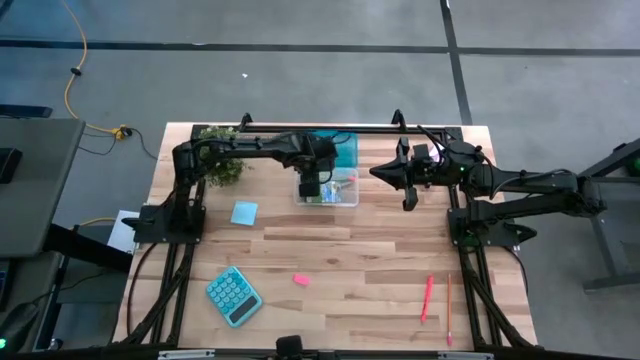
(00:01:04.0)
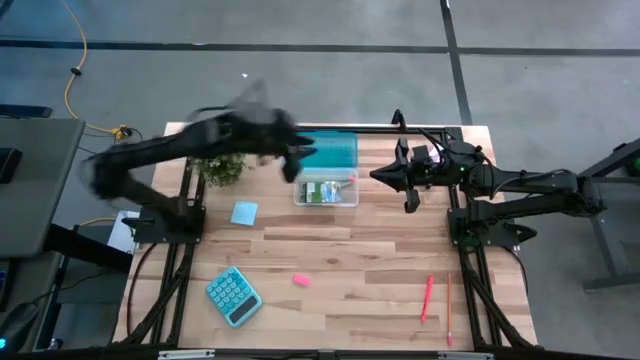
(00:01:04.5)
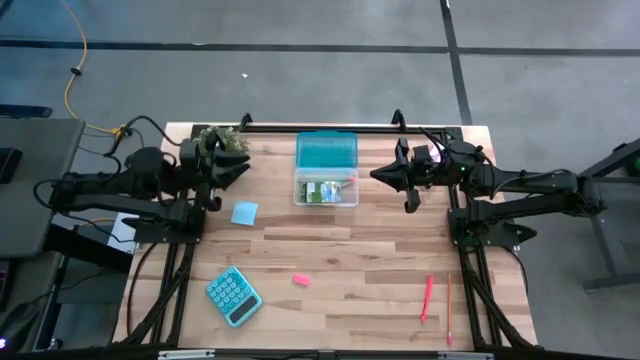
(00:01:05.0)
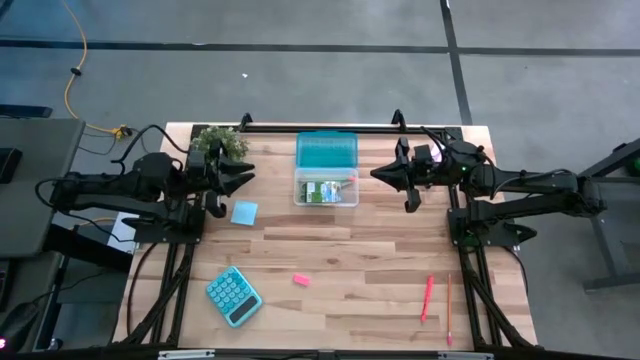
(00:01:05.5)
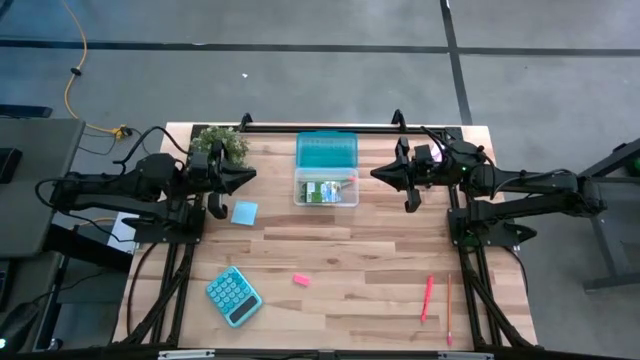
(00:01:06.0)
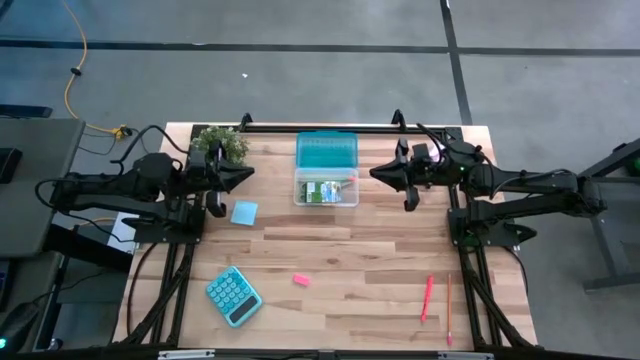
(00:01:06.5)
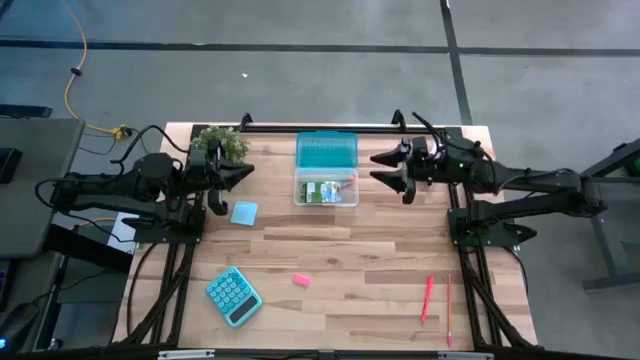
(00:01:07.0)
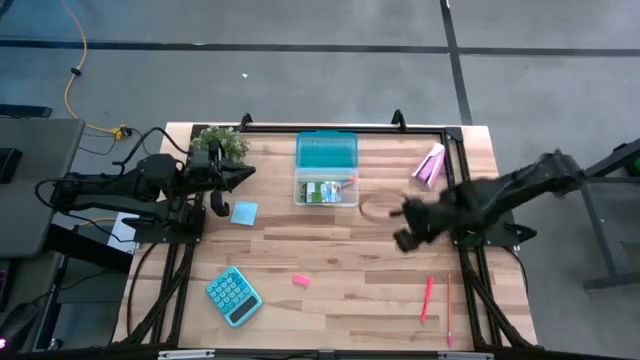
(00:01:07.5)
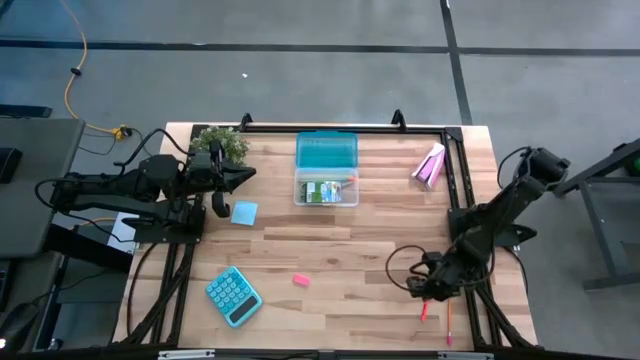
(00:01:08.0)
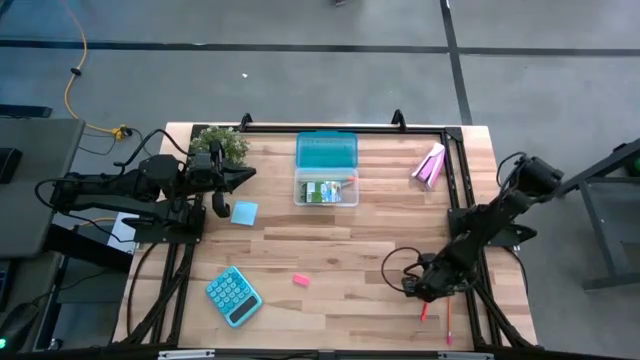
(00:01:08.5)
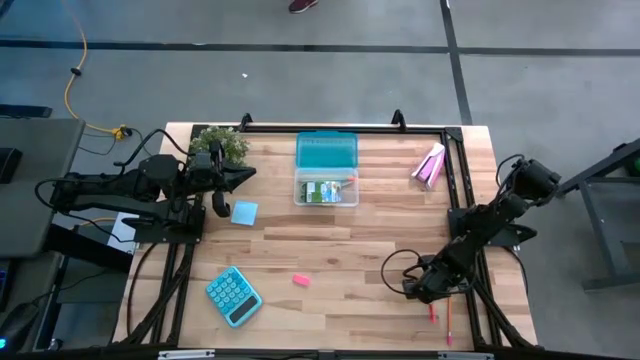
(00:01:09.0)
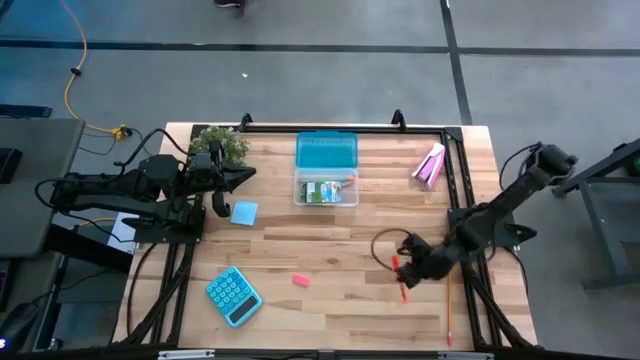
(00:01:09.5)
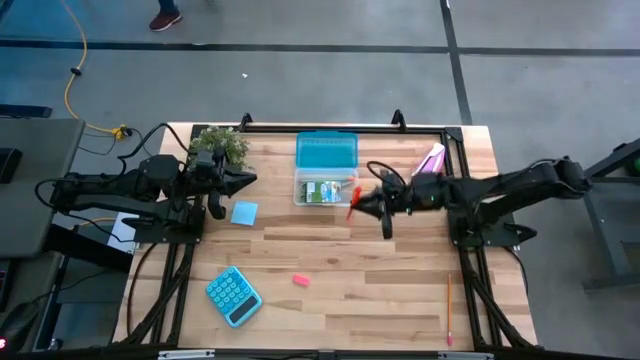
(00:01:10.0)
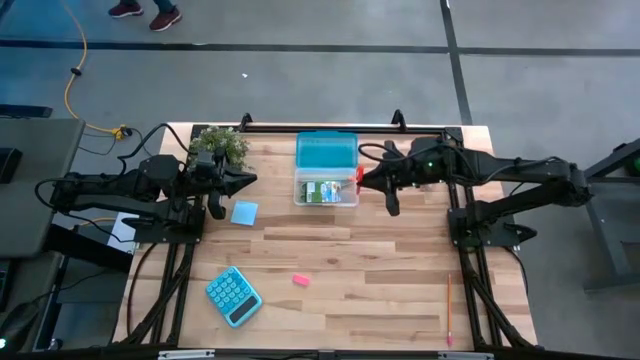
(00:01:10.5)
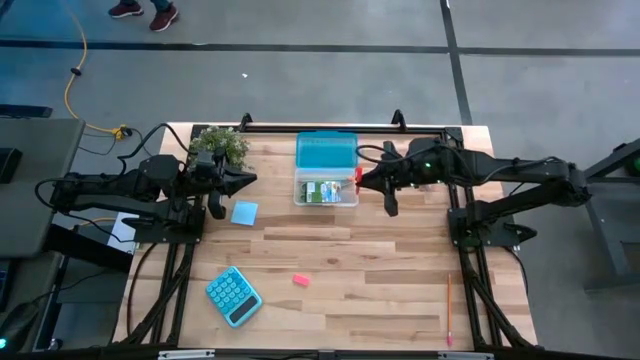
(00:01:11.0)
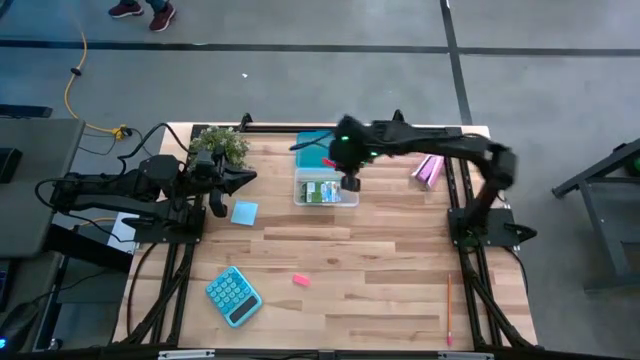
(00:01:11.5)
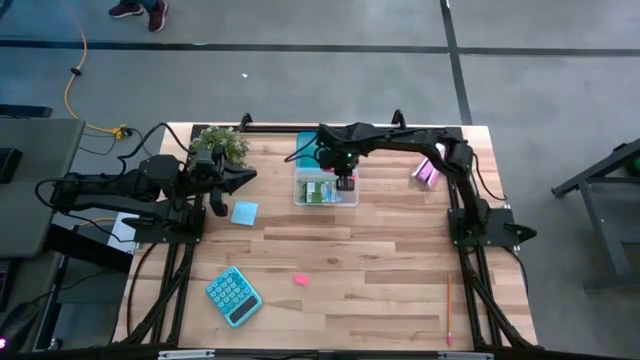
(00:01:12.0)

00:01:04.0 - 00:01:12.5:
Task: Pack school essentials
Put the orange pen into the supply box

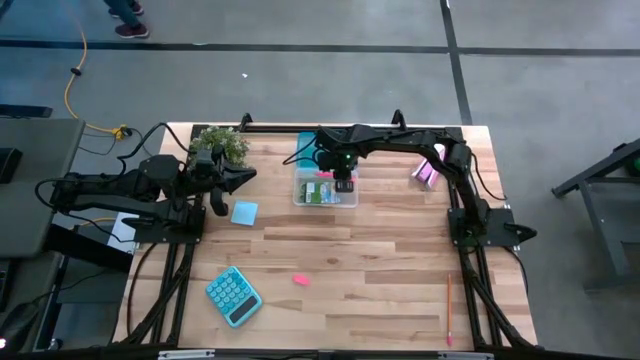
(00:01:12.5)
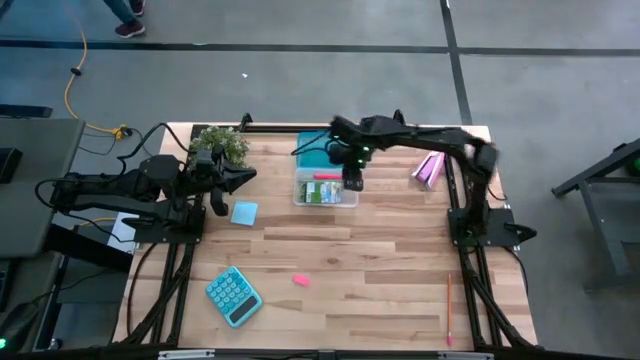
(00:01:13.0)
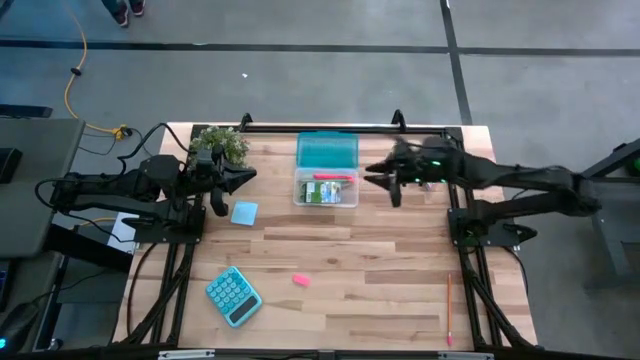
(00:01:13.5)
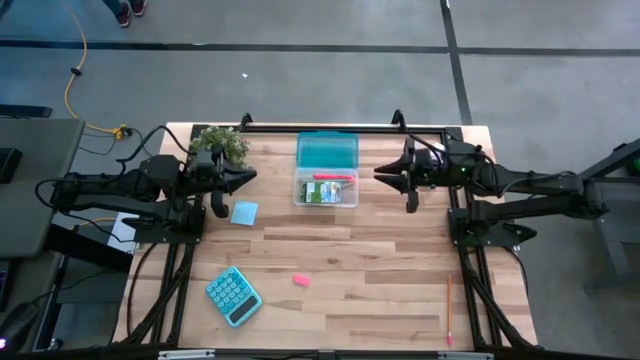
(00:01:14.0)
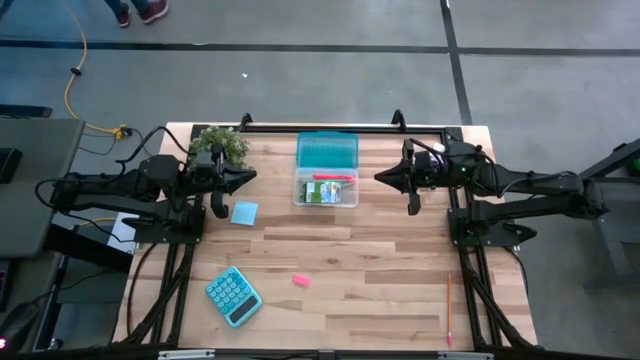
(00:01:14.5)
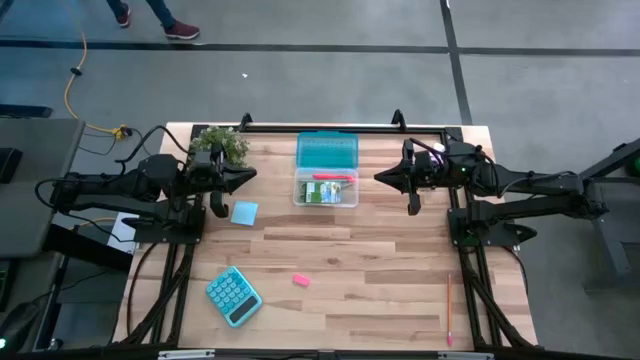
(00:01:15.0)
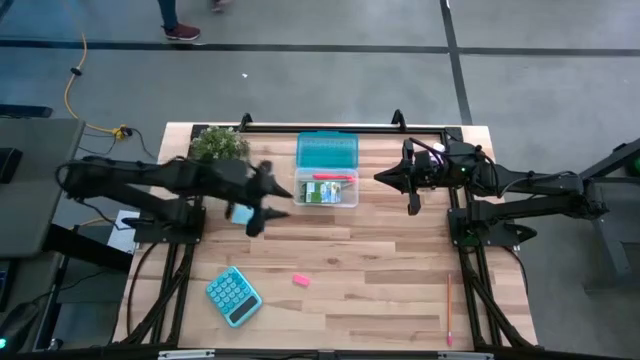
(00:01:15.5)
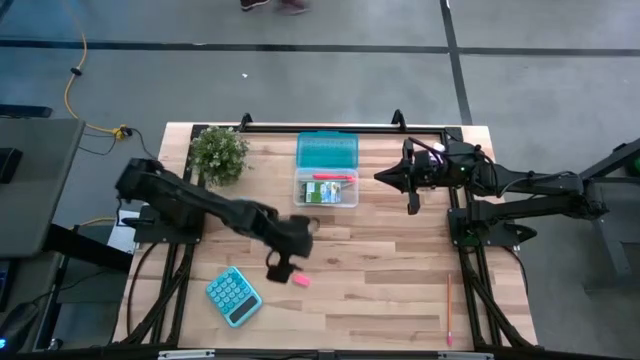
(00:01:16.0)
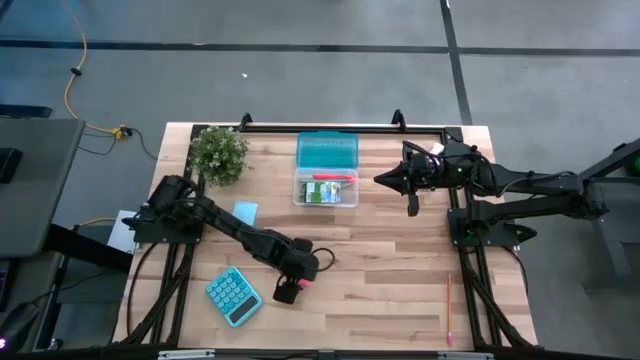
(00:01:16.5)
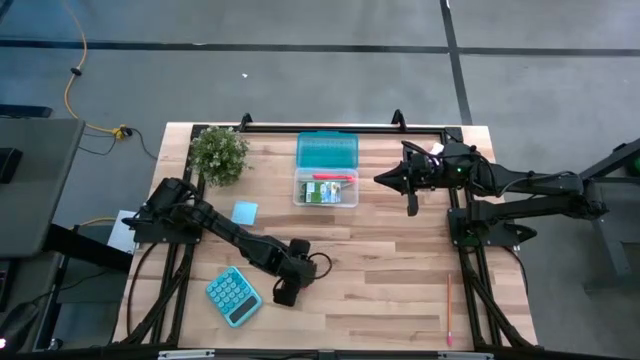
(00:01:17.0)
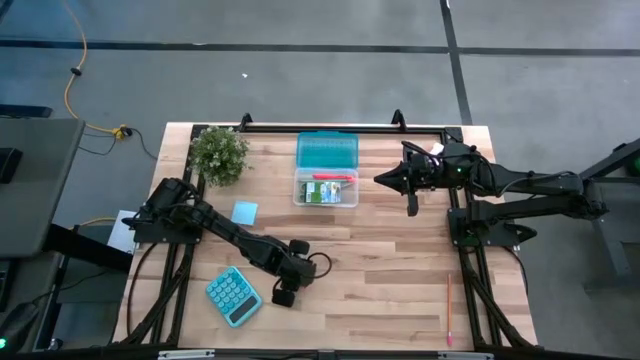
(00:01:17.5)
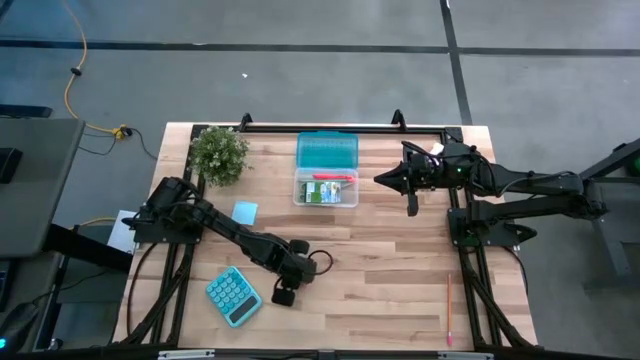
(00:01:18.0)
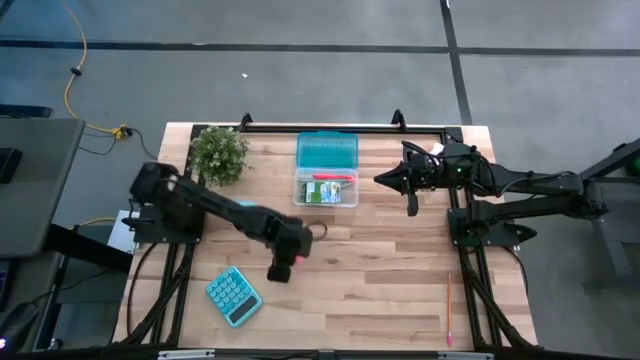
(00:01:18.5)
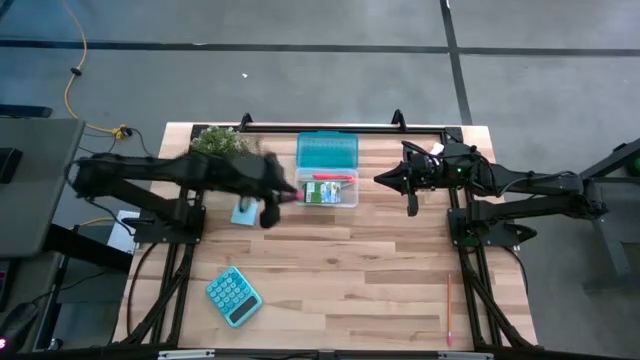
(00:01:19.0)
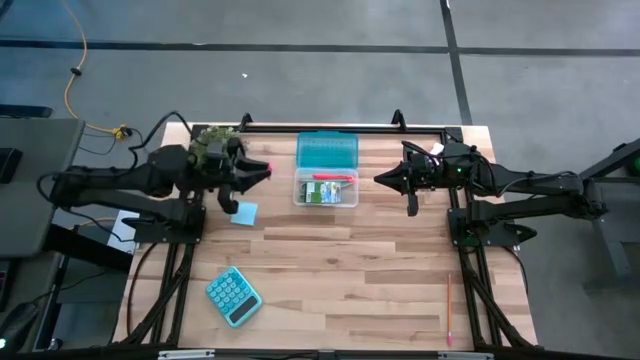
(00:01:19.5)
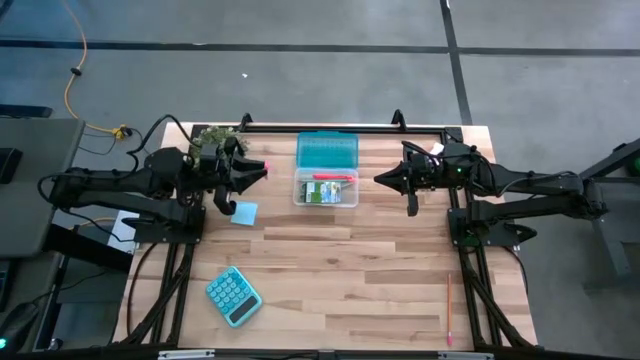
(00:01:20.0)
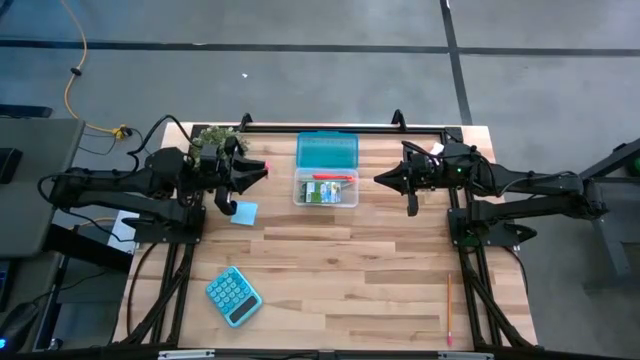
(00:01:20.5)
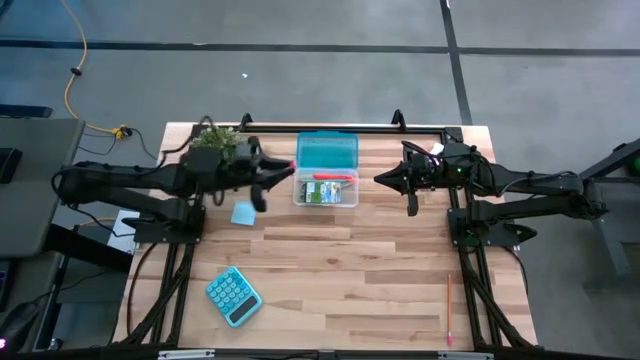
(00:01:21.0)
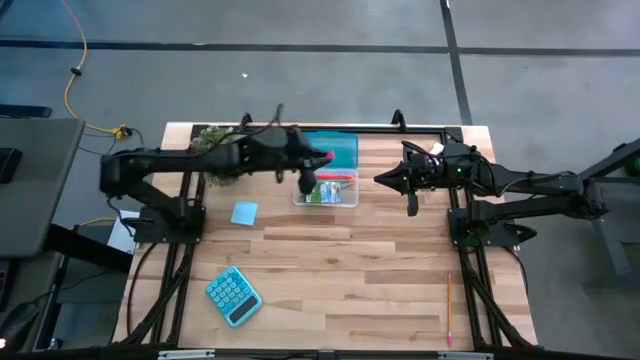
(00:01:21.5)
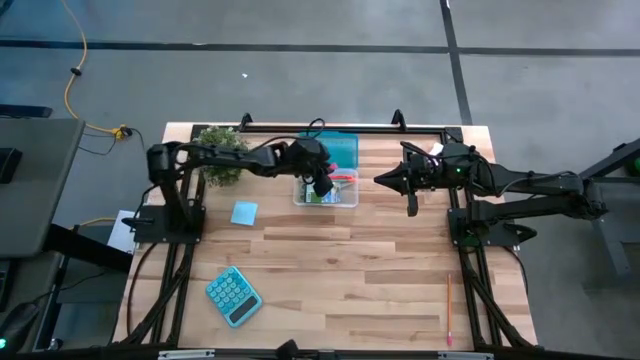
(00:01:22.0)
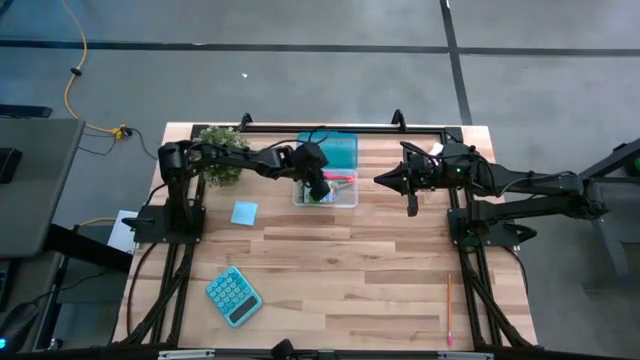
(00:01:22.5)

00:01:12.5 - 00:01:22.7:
Put the pink eraser into the supply box

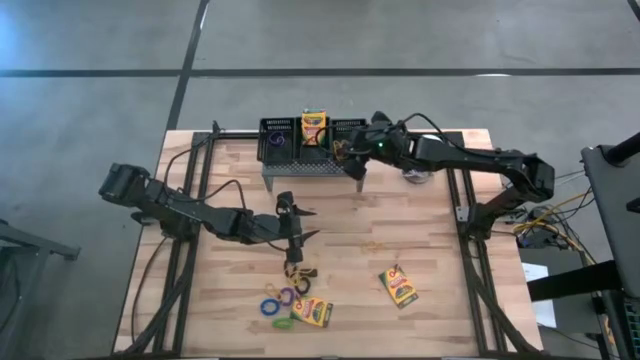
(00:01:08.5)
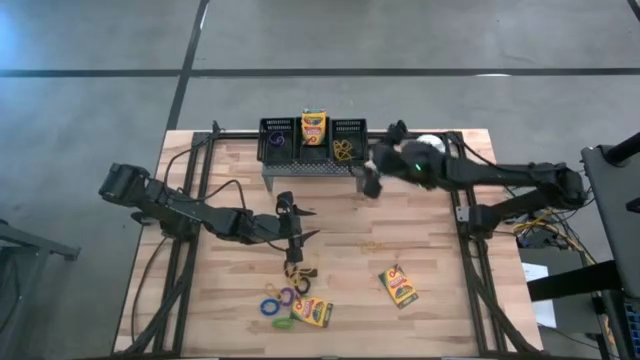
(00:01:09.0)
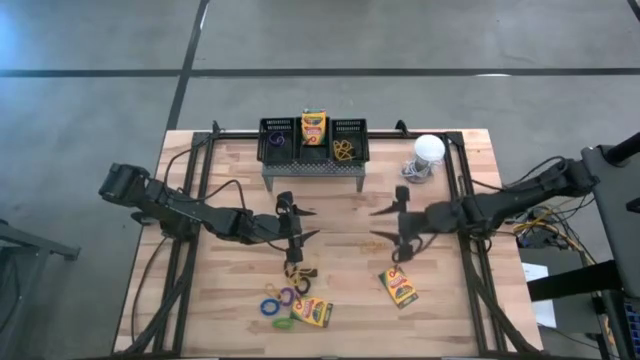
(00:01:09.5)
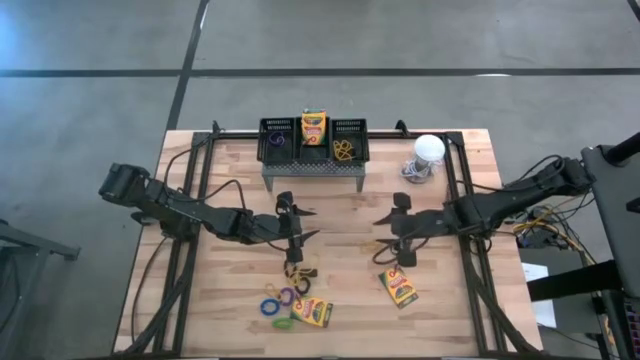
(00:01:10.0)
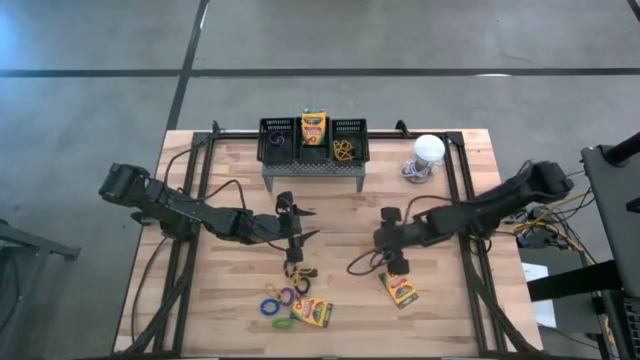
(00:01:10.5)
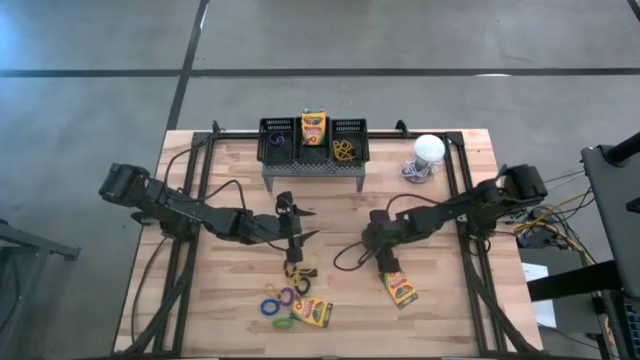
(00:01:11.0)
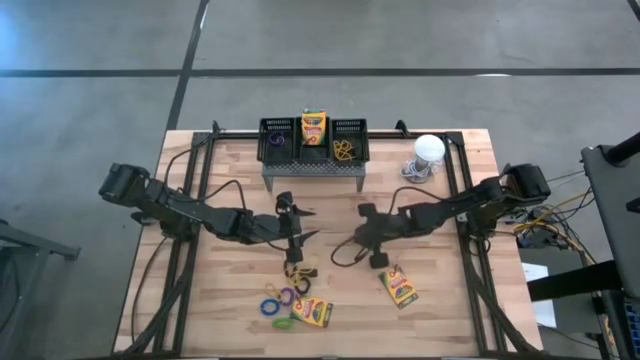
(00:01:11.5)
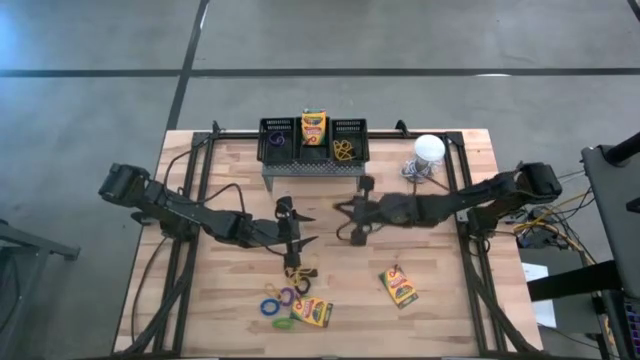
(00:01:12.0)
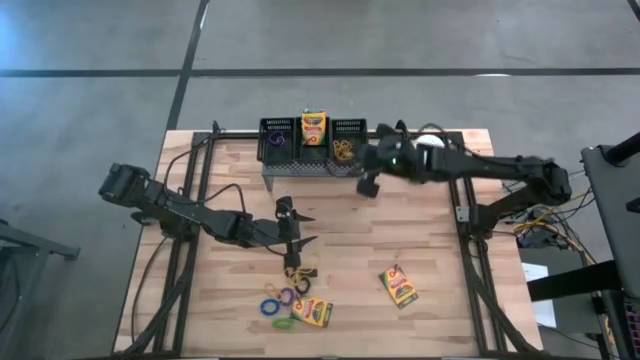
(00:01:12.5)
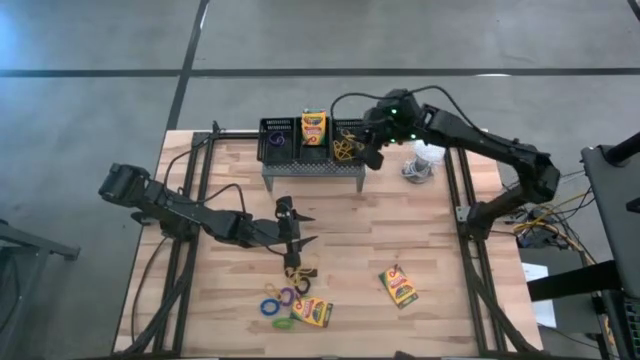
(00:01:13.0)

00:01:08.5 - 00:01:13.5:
Task: Pick & Place Office Desk Supplies
Put the yellow rubber band into the right black basket on the shelf
